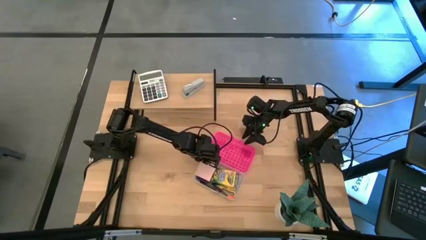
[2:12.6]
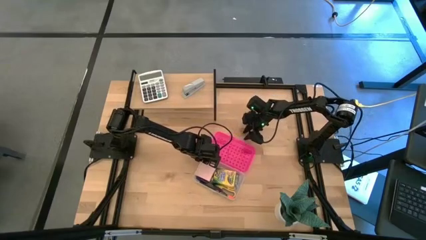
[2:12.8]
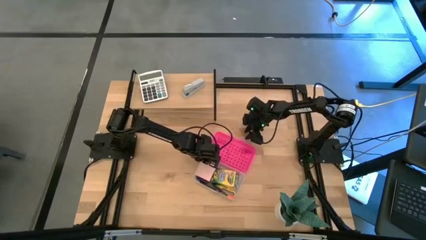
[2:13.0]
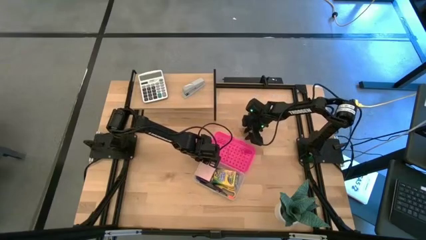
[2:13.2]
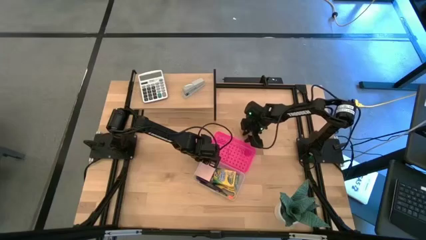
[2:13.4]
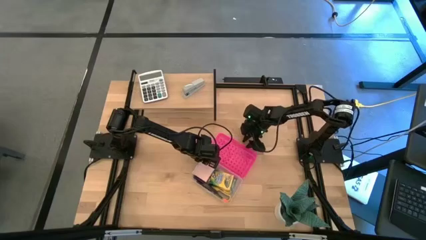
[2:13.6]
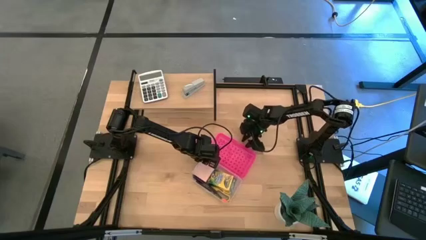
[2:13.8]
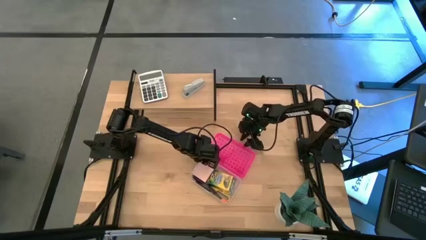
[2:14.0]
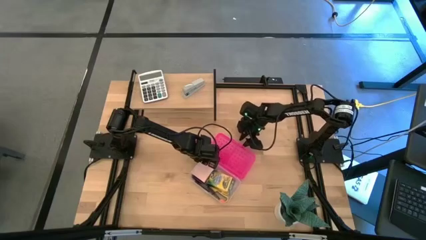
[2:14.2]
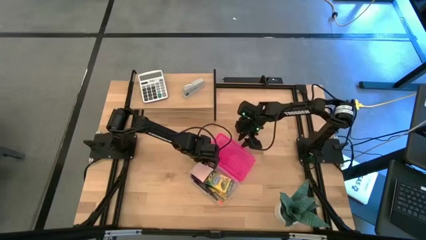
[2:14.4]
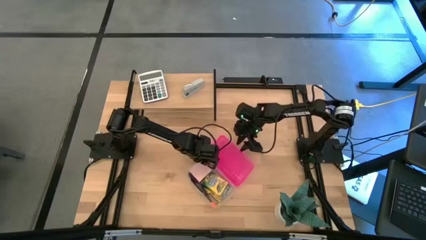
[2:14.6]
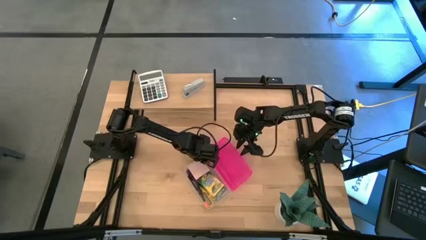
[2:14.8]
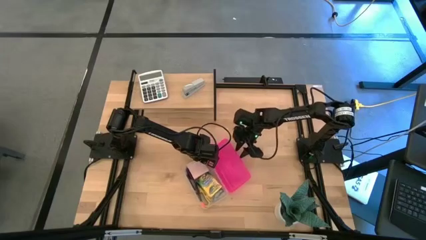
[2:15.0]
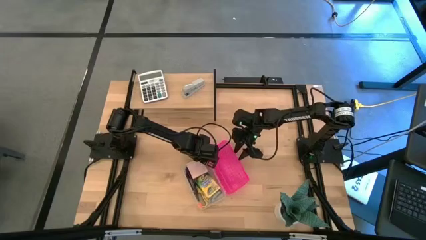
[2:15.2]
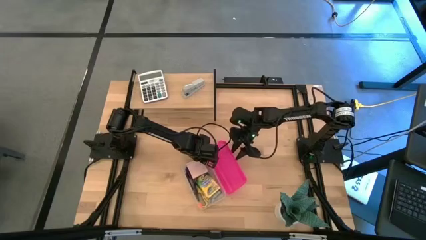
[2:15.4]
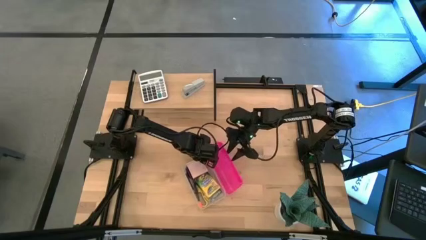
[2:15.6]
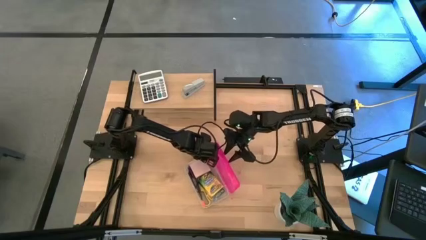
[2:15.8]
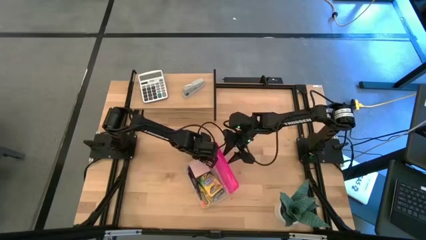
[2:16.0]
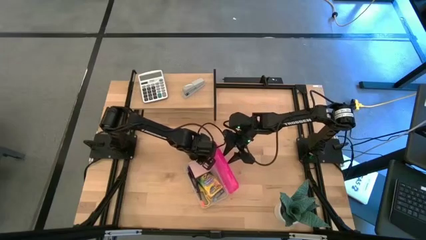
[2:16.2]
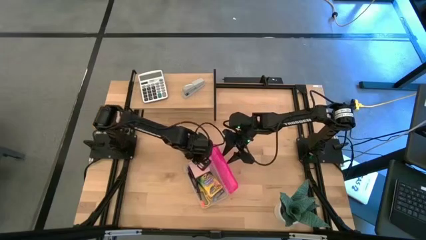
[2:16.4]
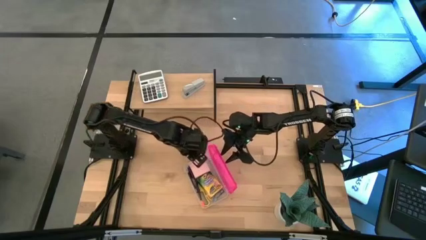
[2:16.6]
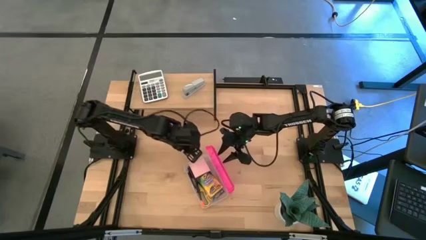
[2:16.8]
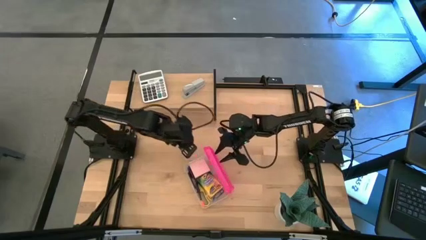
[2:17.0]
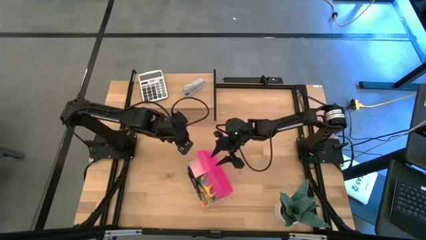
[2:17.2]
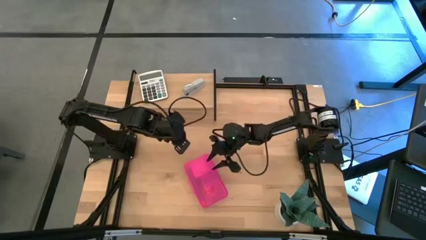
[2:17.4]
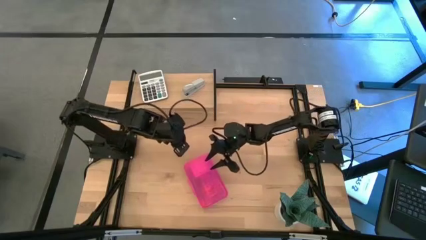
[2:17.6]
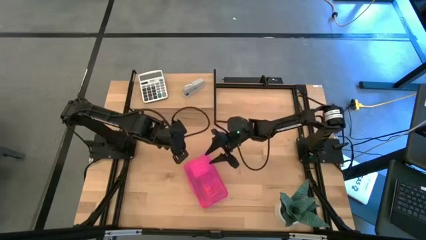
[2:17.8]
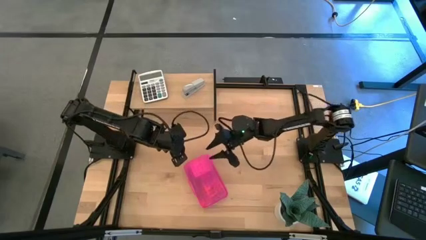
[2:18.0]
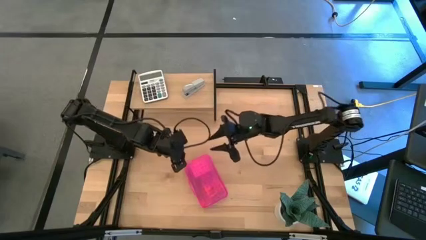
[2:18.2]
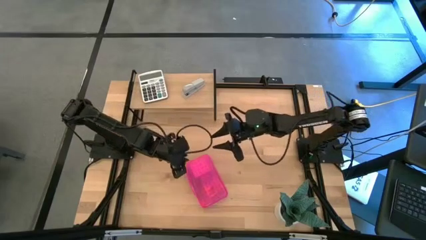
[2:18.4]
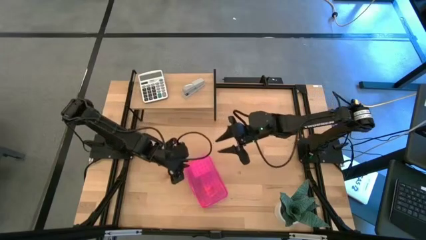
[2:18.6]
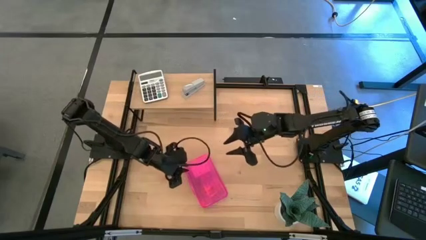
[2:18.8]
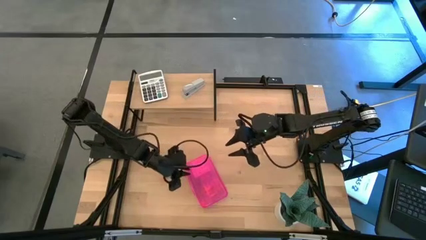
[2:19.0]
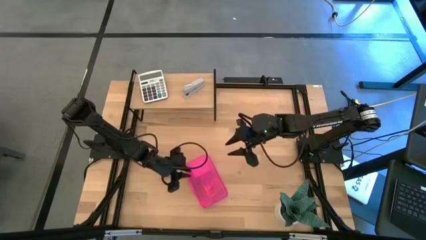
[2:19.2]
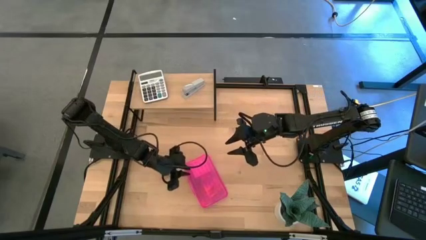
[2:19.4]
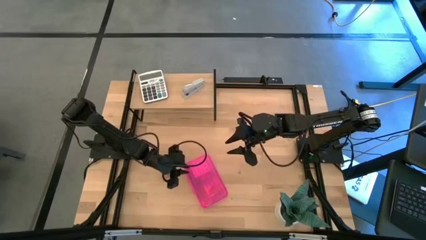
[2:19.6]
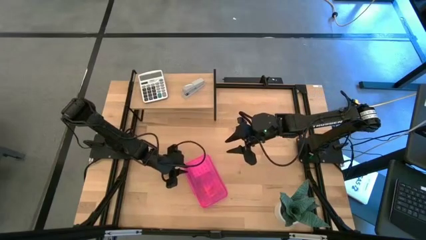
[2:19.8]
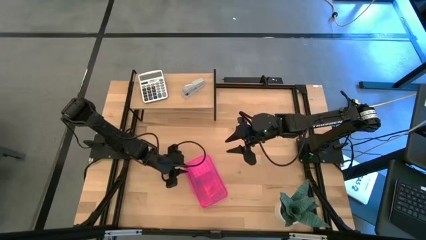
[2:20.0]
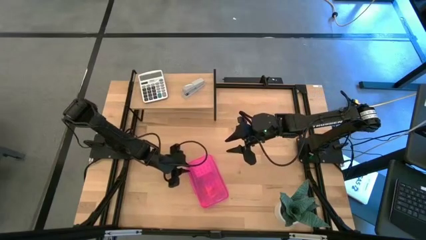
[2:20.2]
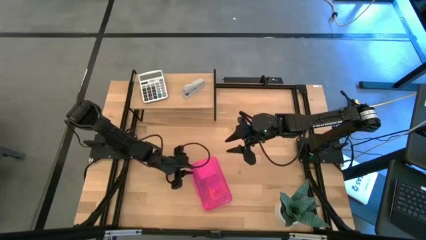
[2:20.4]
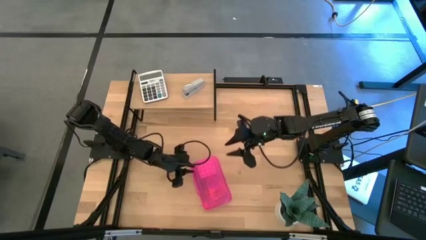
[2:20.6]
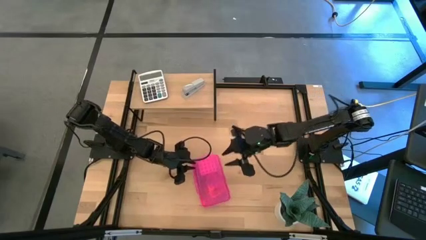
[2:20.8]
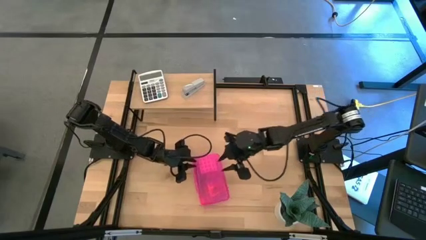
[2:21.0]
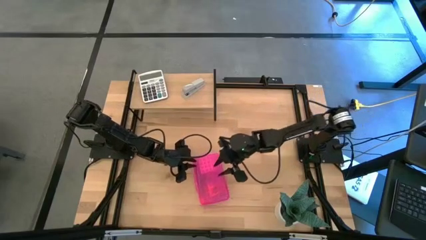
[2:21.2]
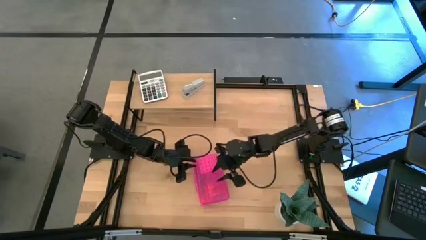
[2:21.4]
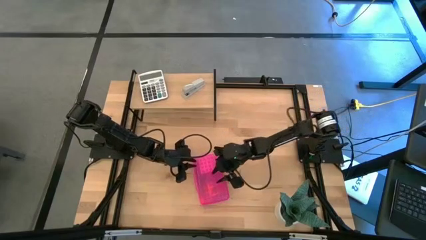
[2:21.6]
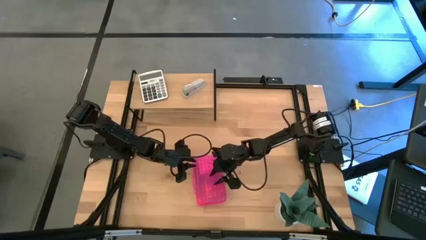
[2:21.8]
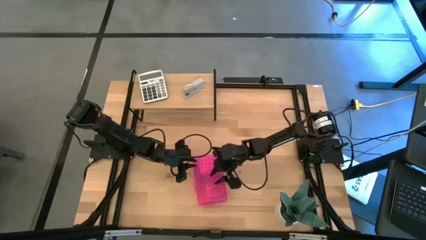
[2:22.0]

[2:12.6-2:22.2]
Task: Pack school essentials
Close the pink supply box

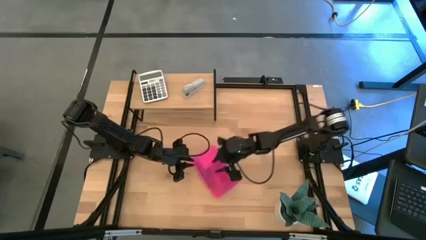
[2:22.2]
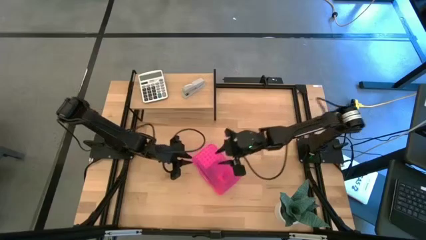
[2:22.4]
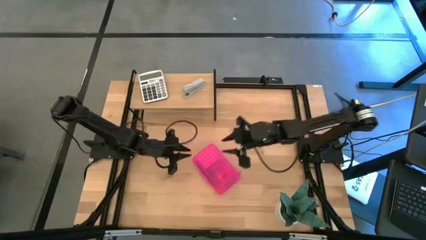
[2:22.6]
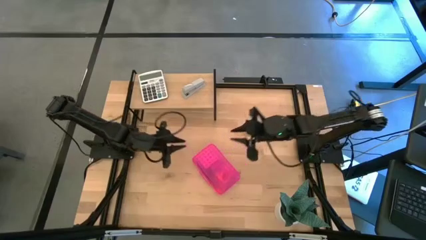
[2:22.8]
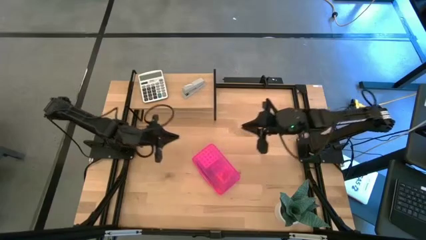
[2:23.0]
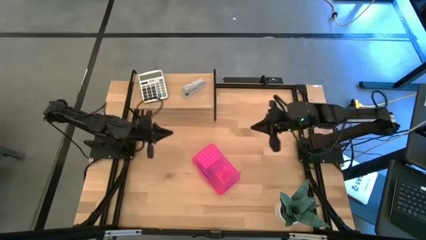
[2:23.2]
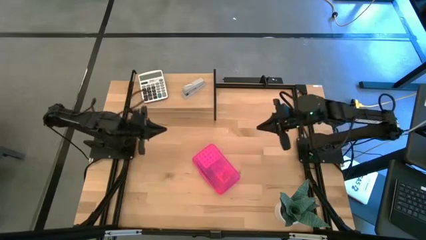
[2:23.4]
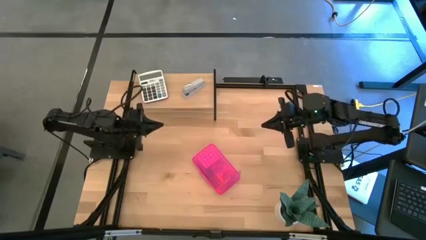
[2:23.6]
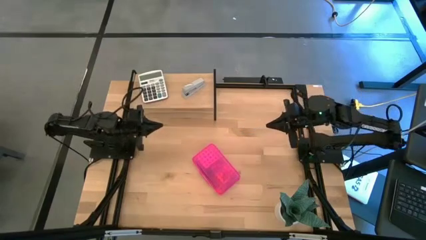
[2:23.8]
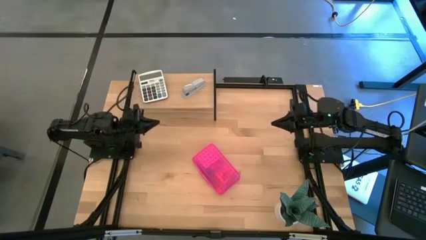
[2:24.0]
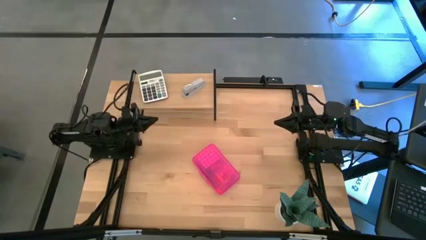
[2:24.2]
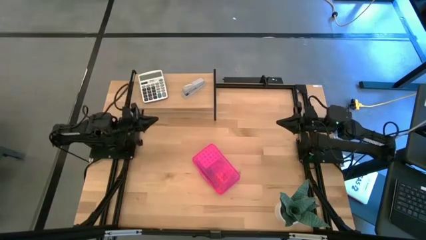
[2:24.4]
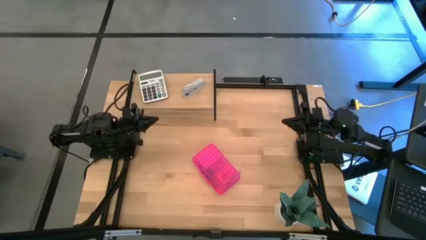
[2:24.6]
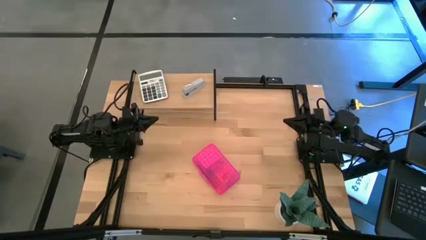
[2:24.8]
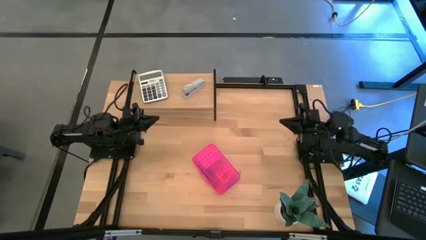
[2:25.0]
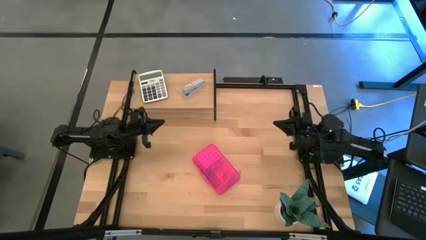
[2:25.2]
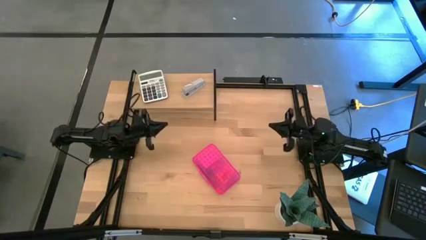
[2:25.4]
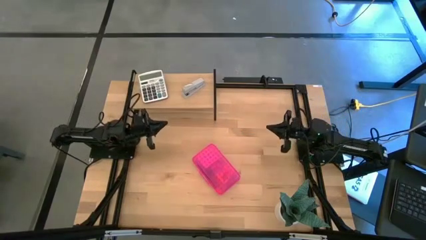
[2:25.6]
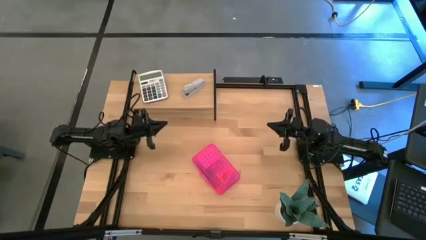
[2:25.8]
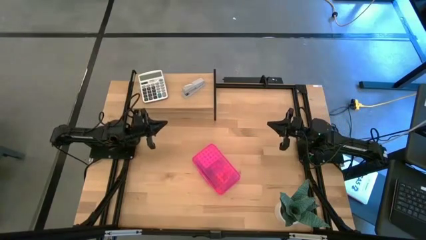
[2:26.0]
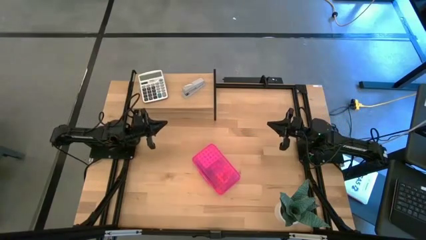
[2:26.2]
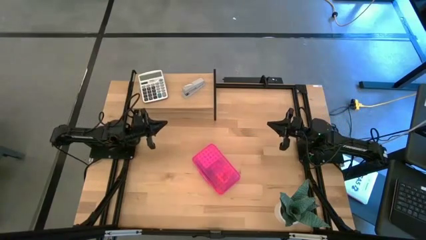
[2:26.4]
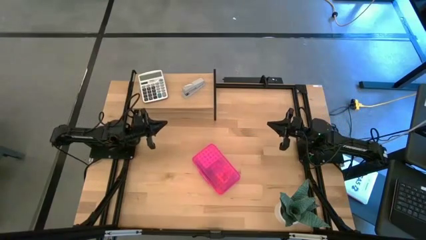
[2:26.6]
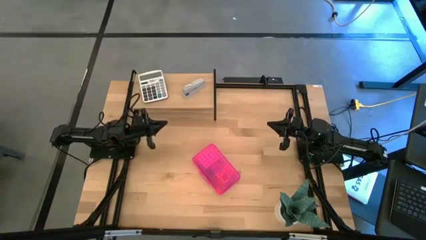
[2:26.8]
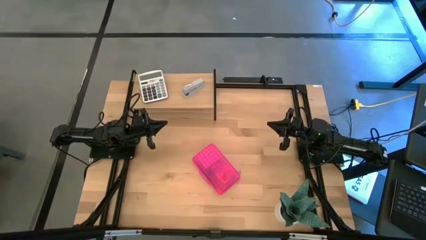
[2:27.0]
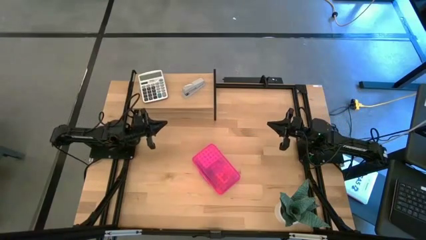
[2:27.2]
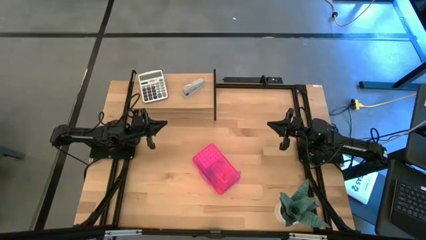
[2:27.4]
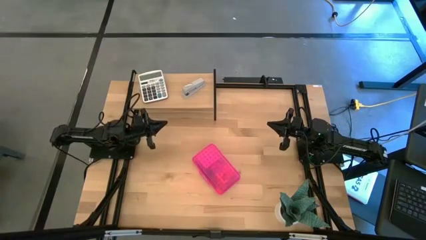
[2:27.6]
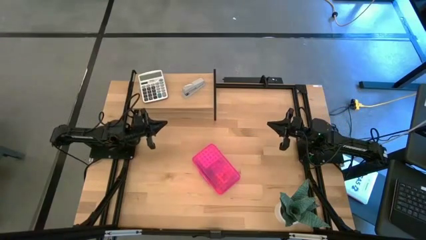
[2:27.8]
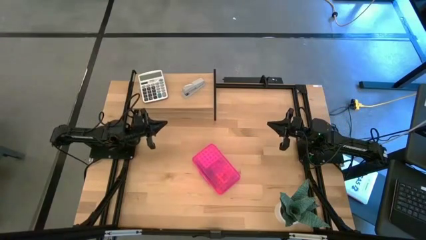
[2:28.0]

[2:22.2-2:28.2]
Return to Home Position

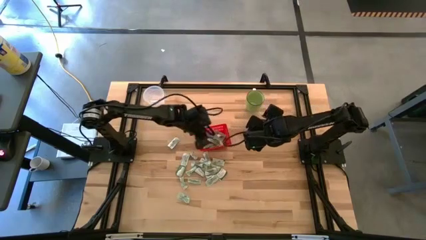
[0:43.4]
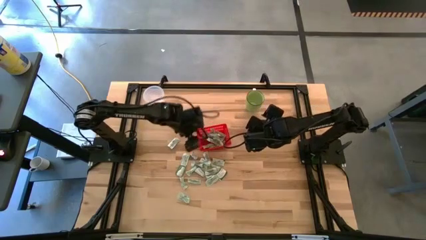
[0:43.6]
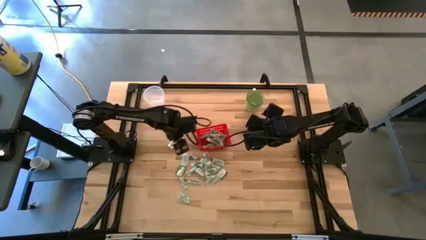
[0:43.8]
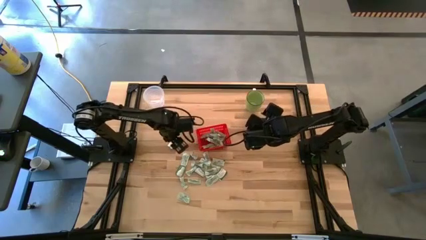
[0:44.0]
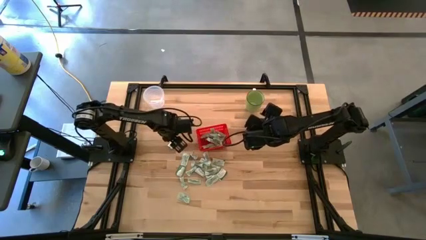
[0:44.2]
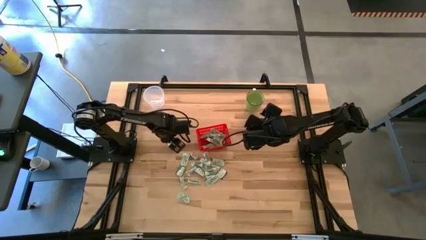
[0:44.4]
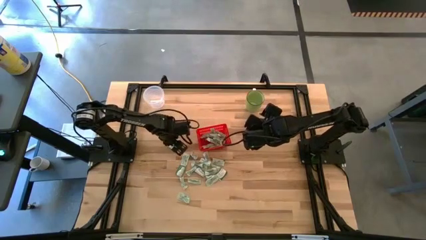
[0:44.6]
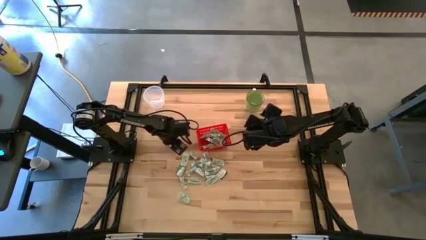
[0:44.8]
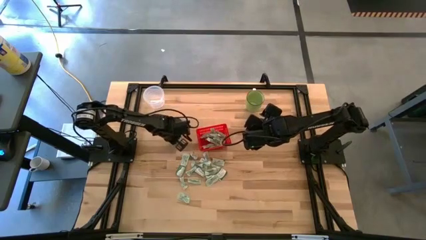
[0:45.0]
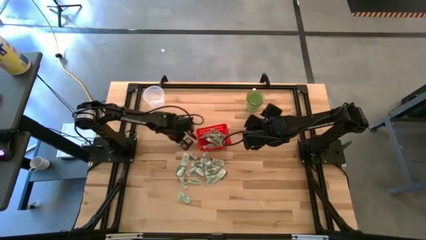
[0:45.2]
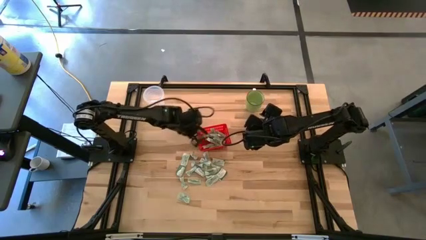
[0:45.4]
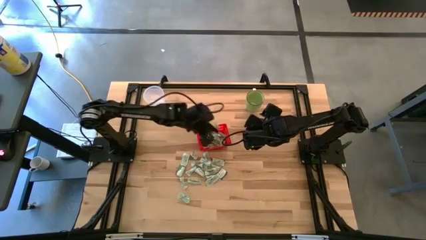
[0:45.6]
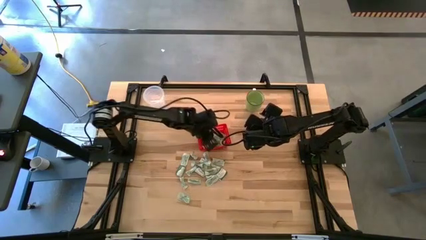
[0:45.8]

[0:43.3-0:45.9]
Task: Pick and place Stevia / Truvia into bins
Put the stevia packet into the red basket
